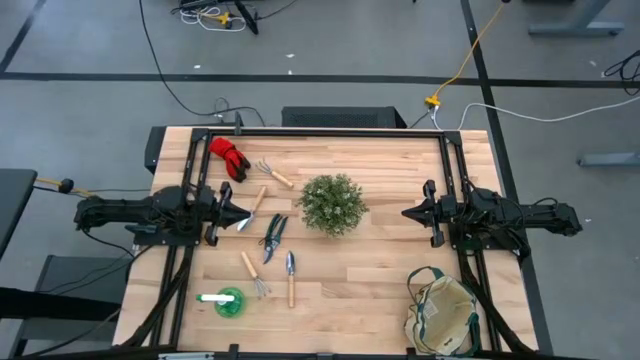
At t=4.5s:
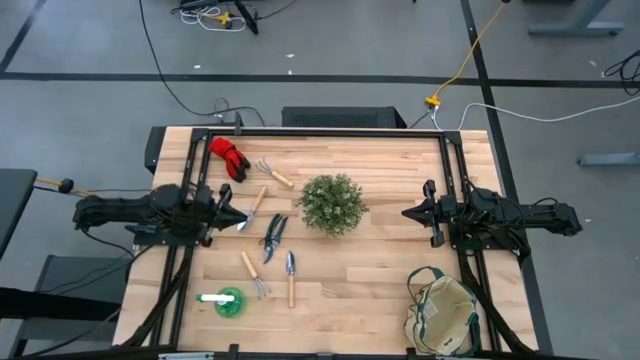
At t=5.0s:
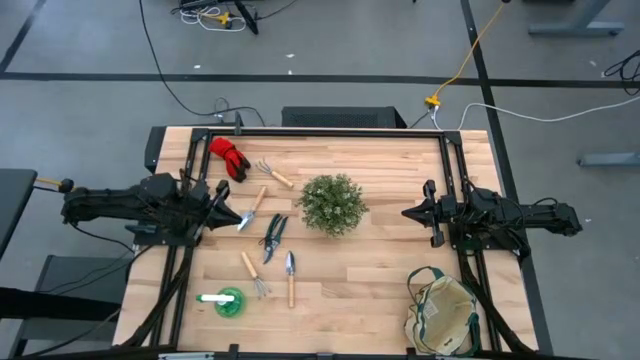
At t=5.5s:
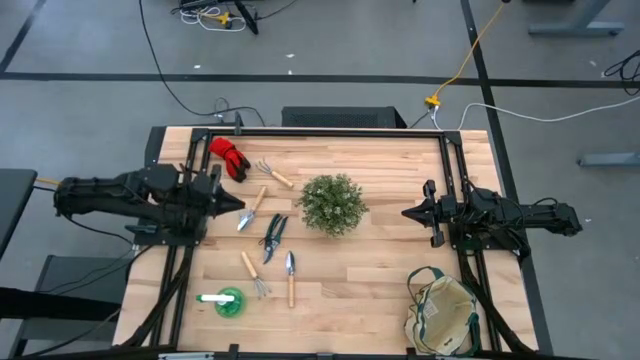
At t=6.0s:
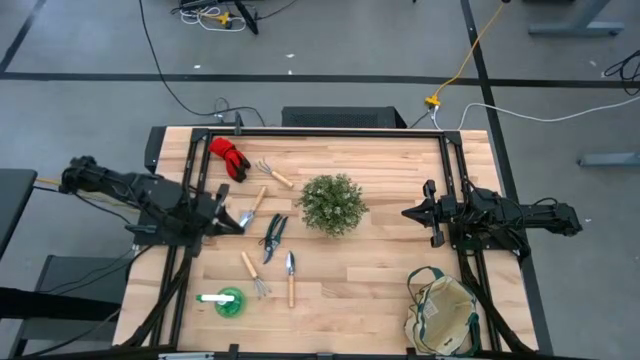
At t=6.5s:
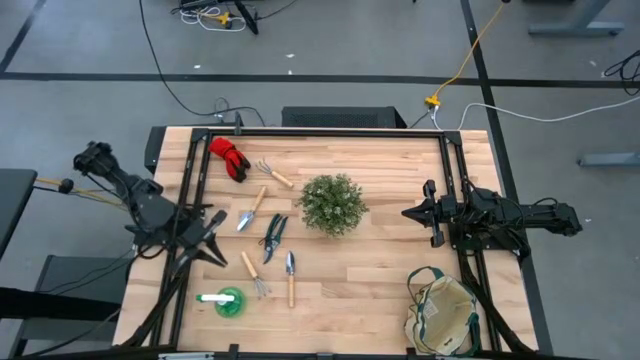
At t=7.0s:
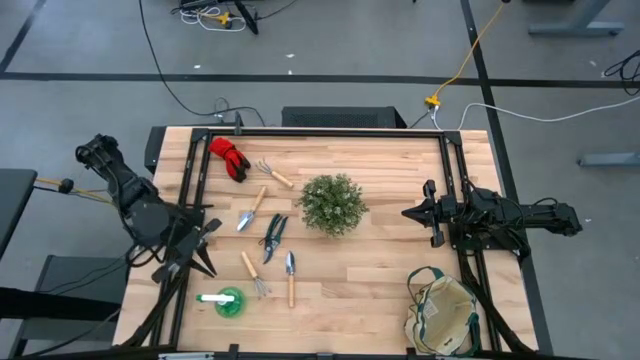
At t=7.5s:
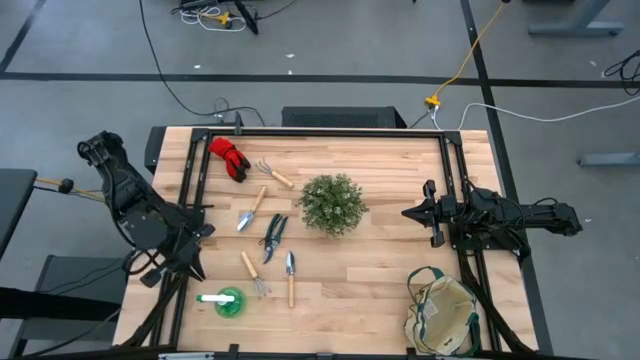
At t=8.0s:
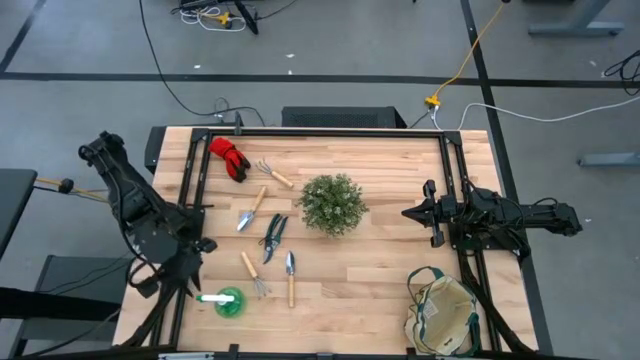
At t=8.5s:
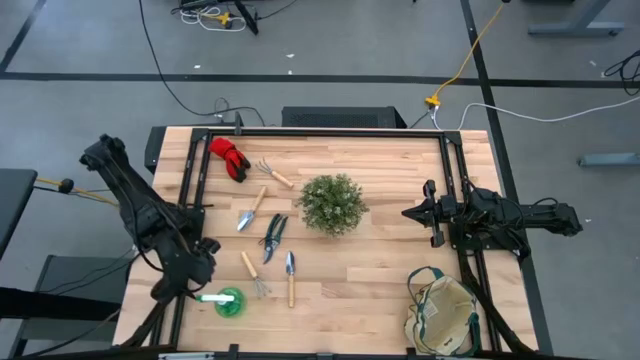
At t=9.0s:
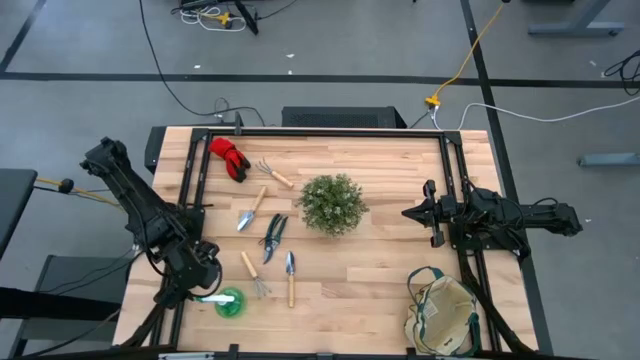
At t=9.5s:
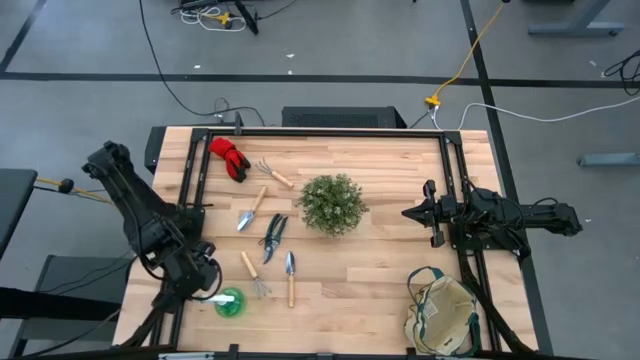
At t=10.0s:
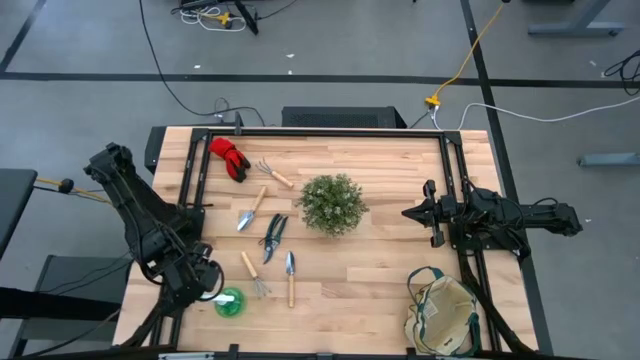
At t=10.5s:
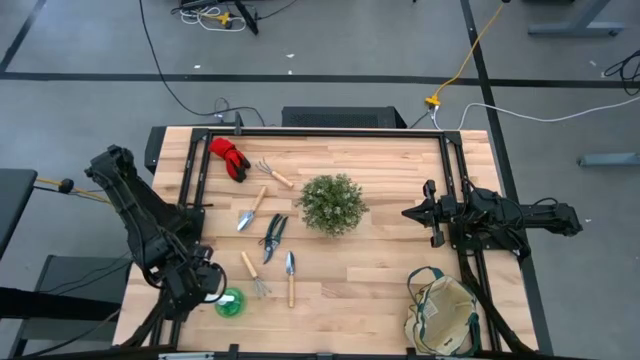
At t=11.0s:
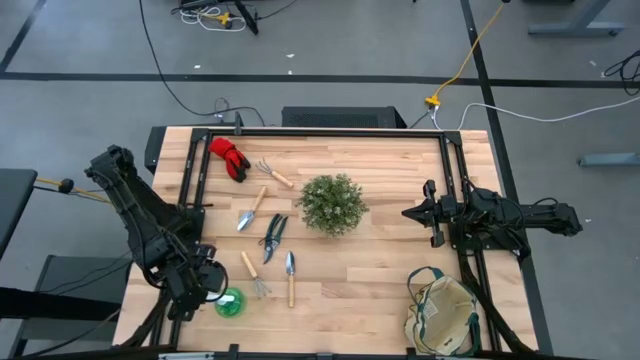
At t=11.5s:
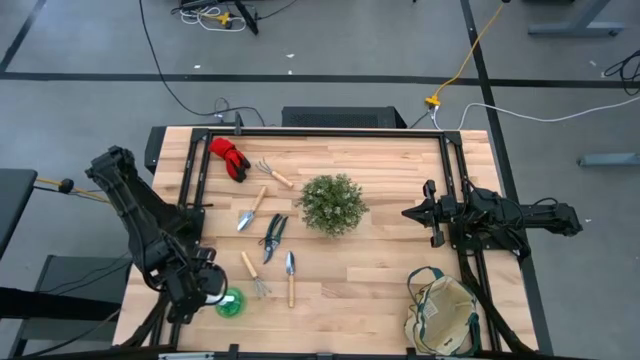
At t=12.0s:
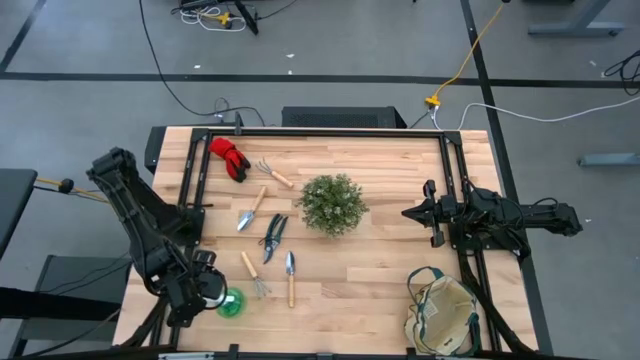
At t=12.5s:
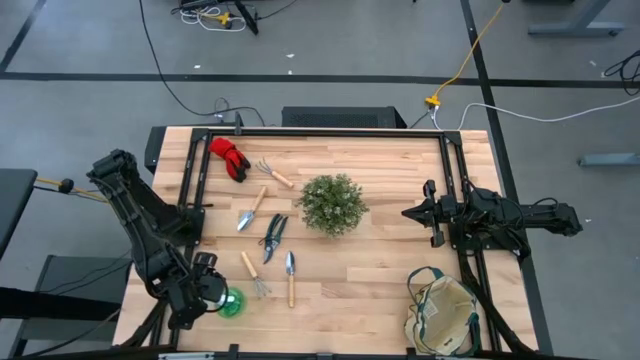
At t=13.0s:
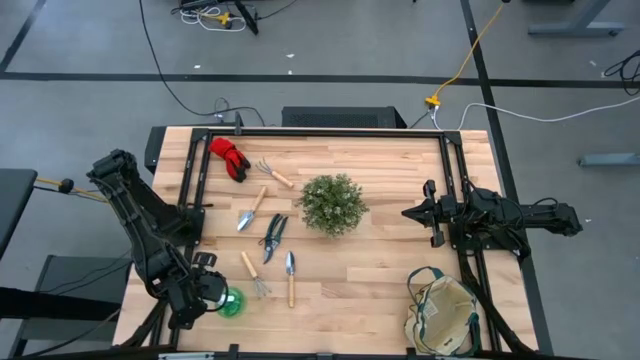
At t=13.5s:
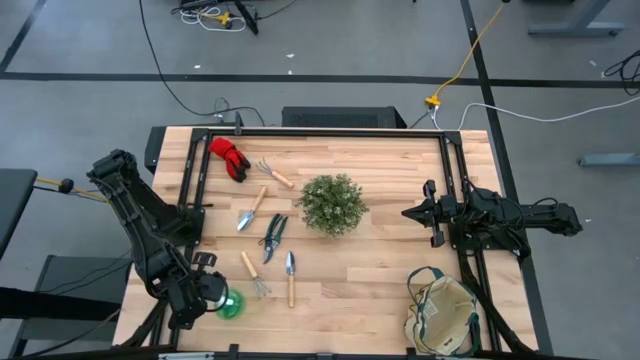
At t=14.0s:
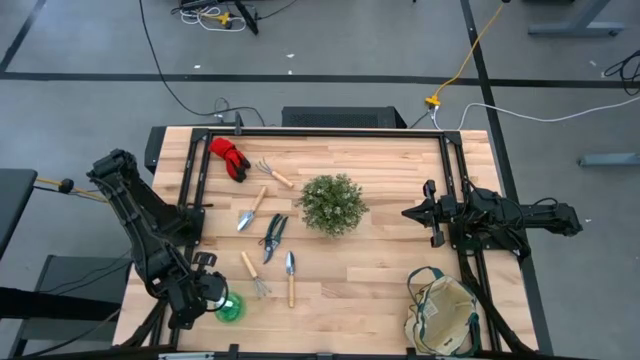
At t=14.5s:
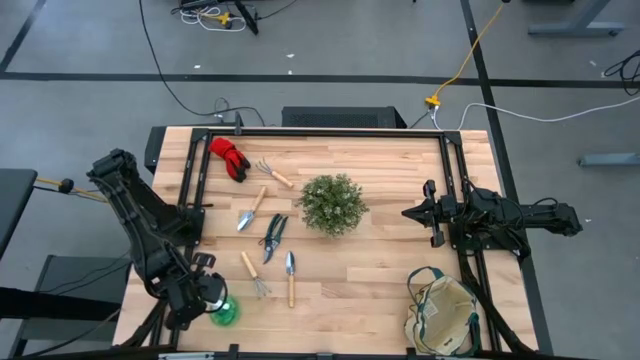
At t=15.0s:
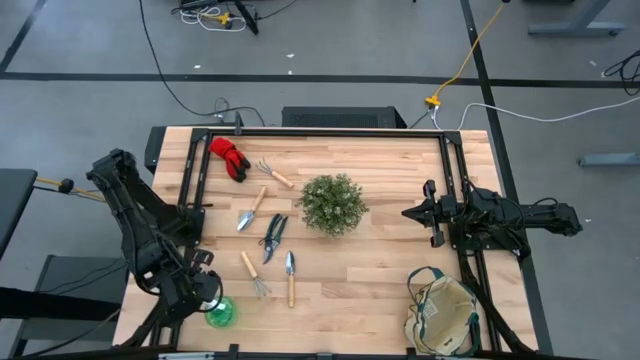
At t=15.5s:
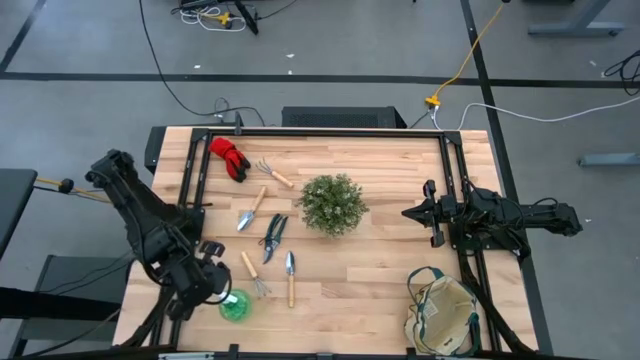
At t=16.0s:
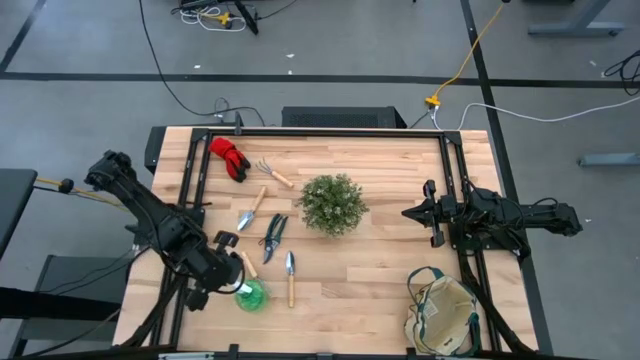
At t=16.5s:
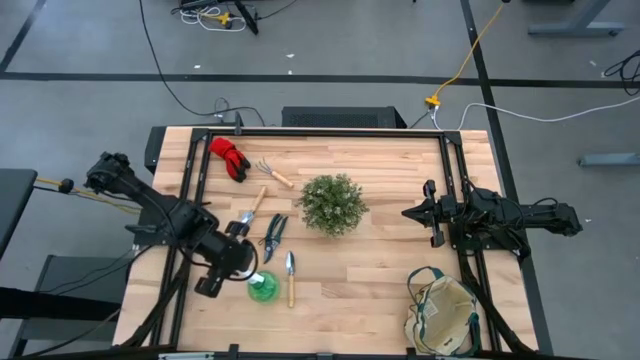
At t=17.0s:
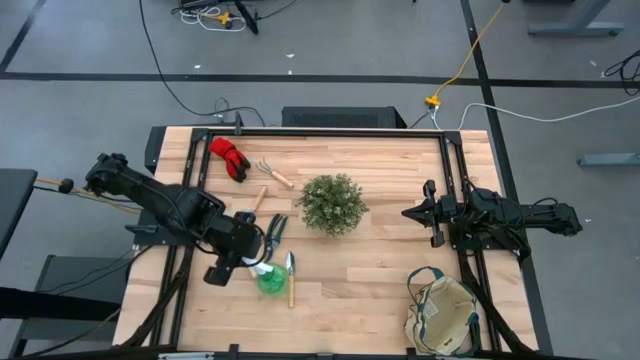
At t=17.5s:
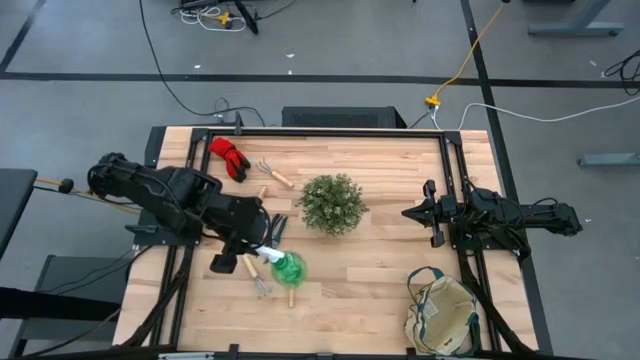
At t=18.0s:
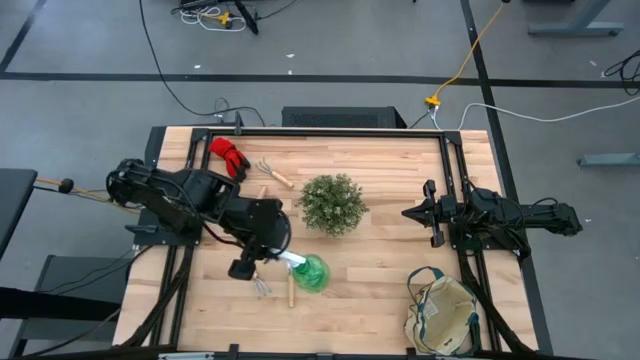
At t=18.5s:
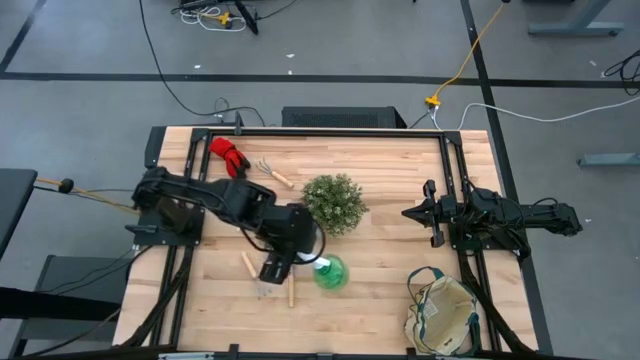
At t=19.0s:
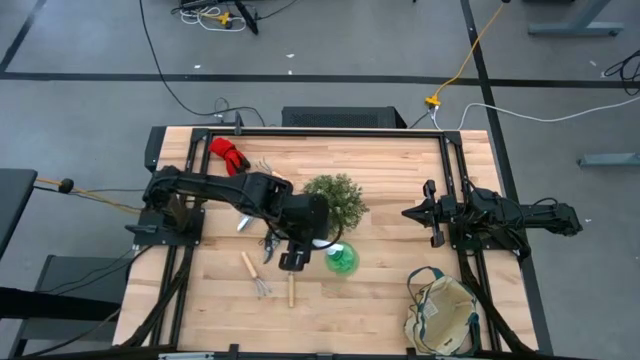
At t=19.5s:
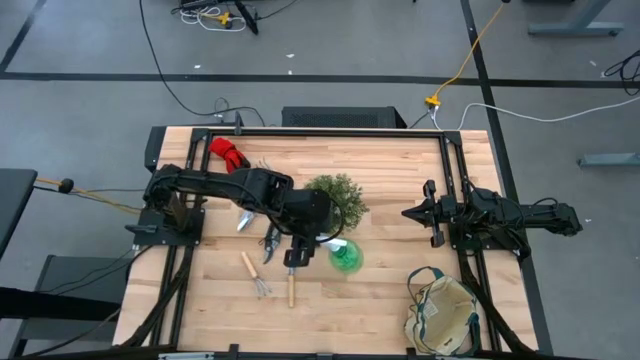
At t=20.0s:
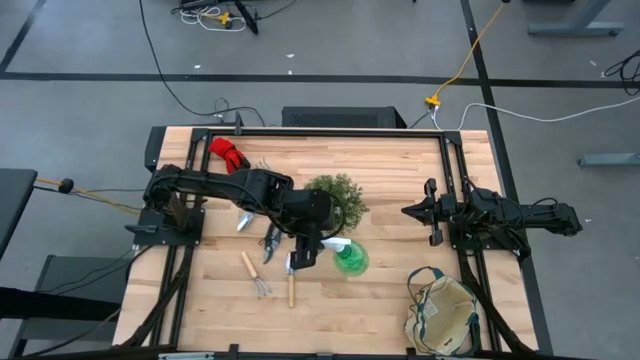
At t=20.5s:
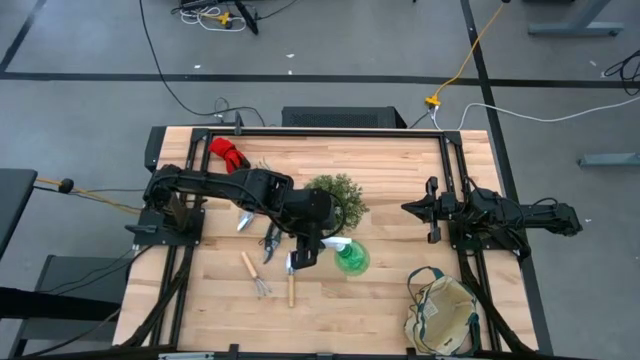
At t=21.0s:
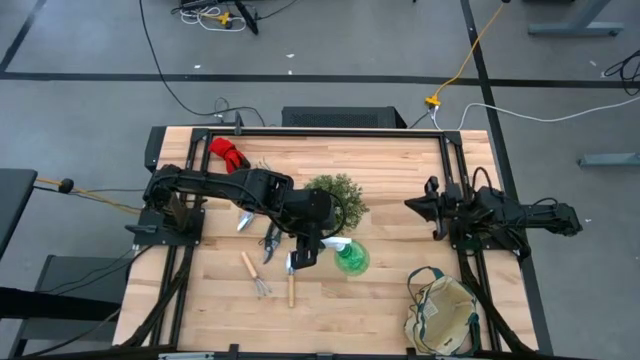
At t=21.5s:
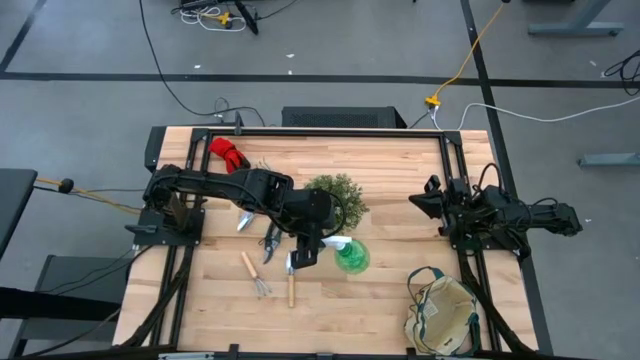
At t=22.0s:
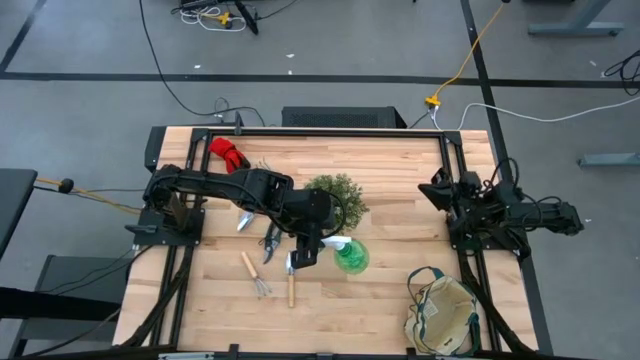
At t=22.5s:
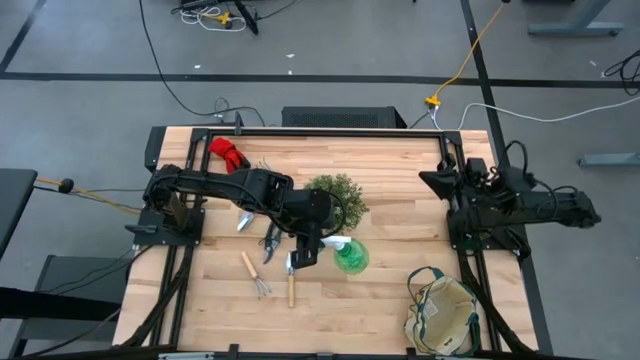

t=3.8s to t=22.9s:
Task: Pick & Place Garden tools in Gardening bag
Put the green spray bottle into the white gardening bag
